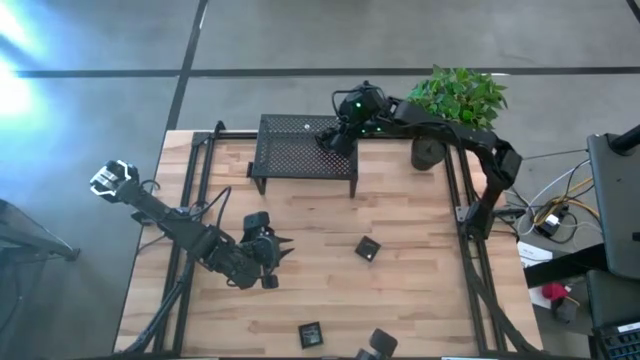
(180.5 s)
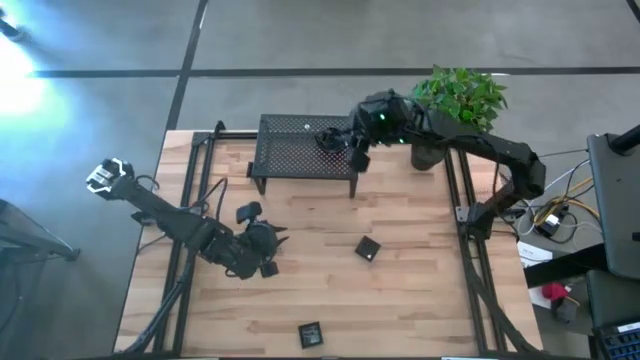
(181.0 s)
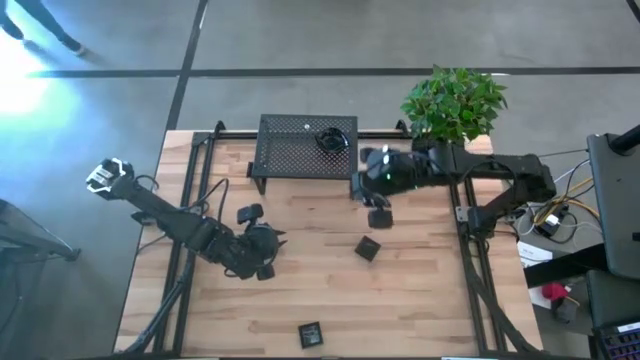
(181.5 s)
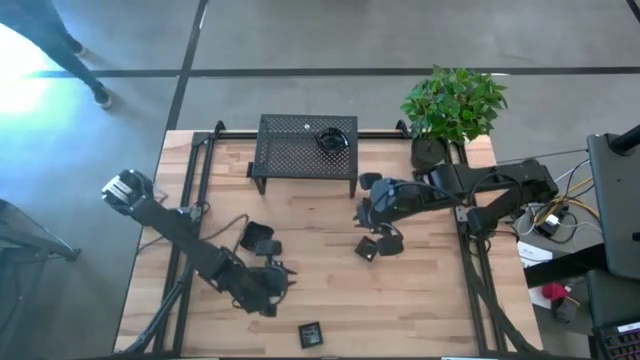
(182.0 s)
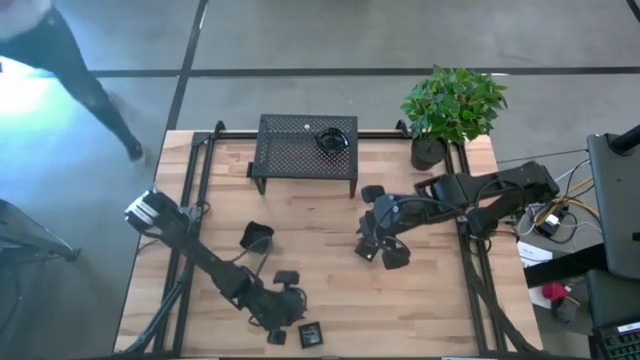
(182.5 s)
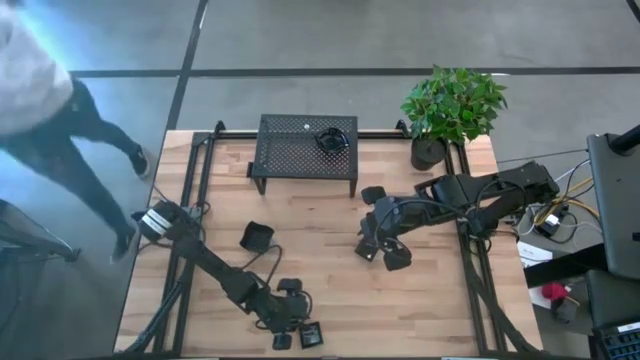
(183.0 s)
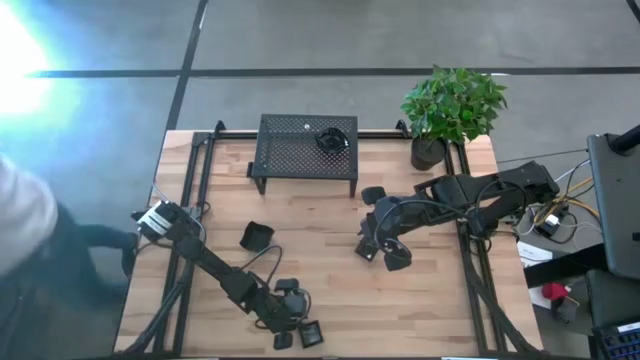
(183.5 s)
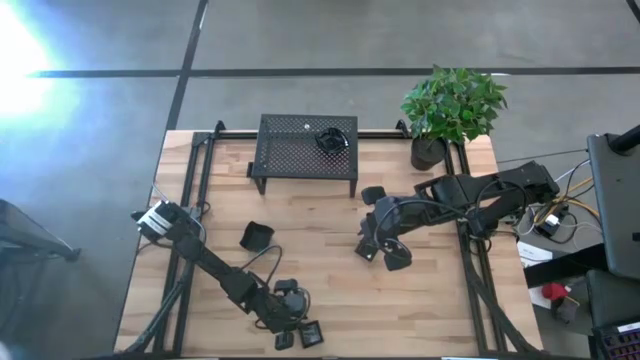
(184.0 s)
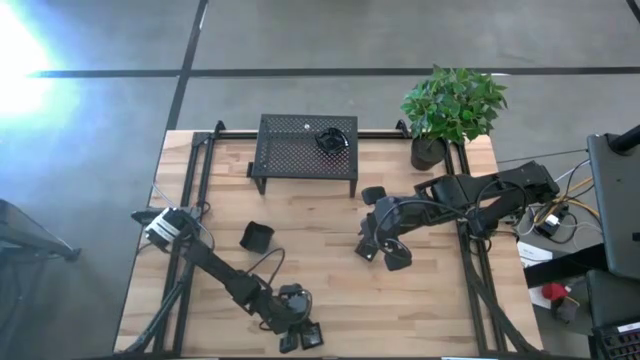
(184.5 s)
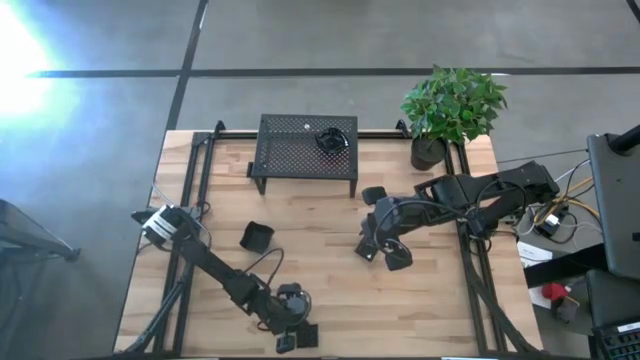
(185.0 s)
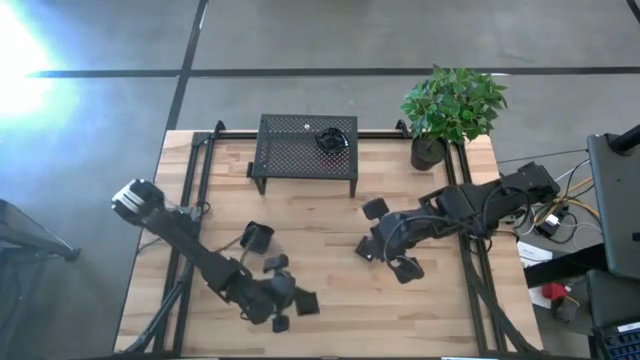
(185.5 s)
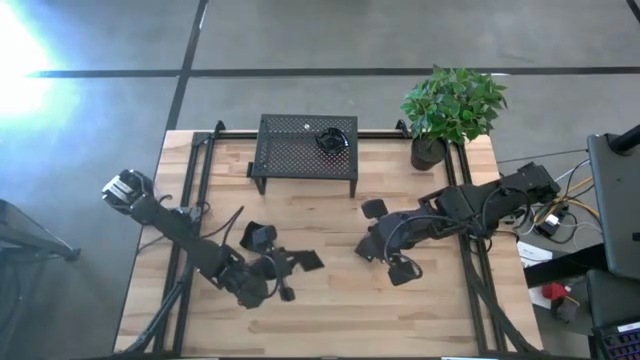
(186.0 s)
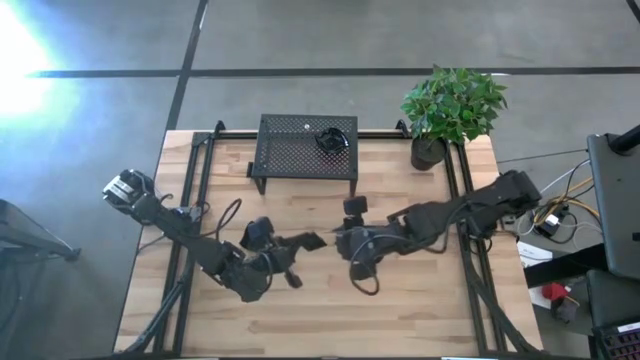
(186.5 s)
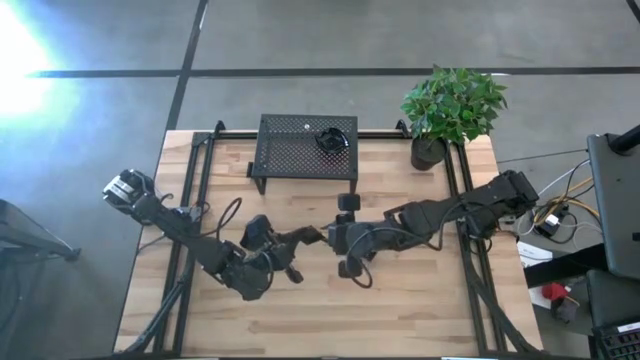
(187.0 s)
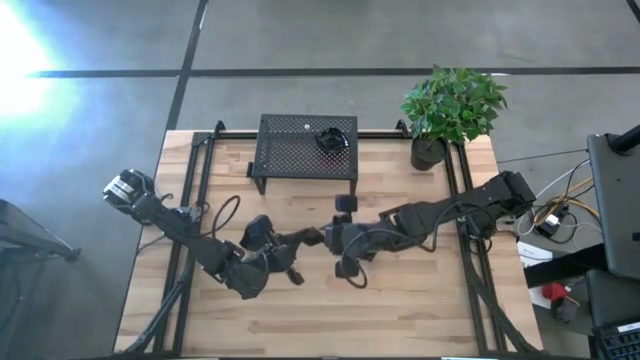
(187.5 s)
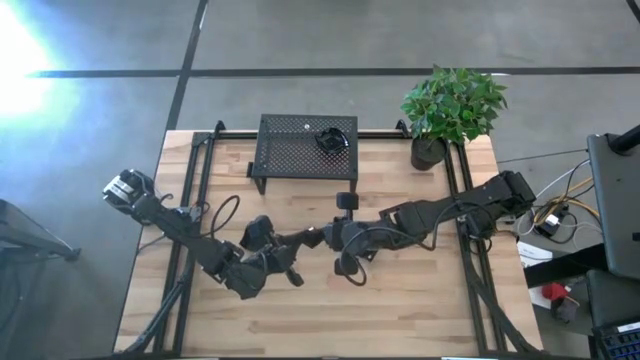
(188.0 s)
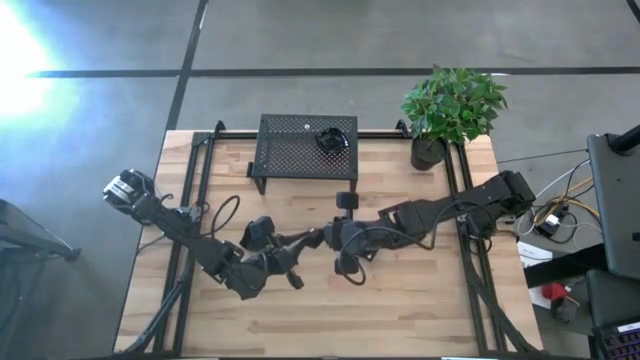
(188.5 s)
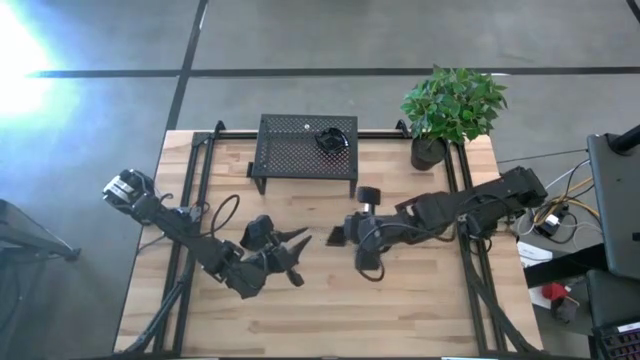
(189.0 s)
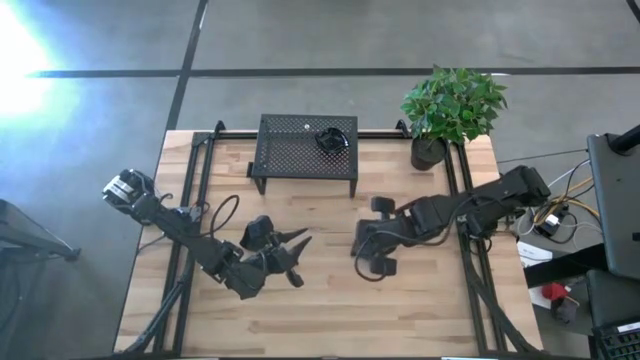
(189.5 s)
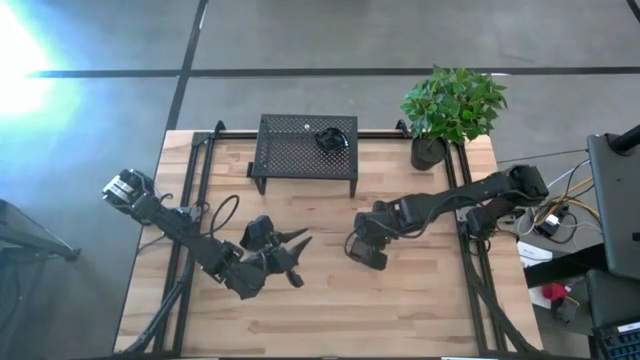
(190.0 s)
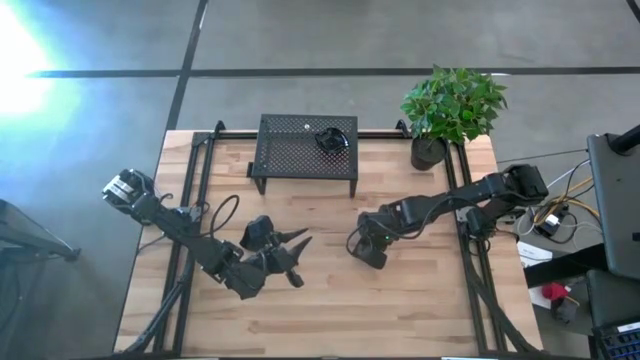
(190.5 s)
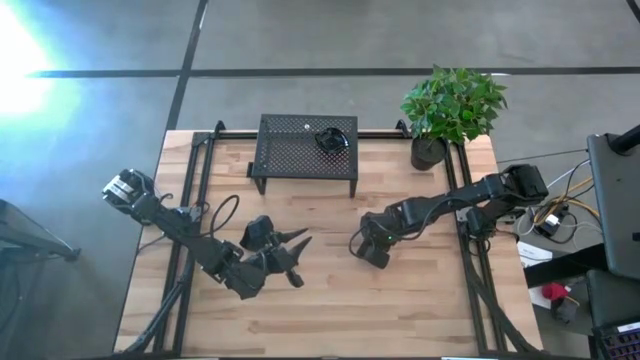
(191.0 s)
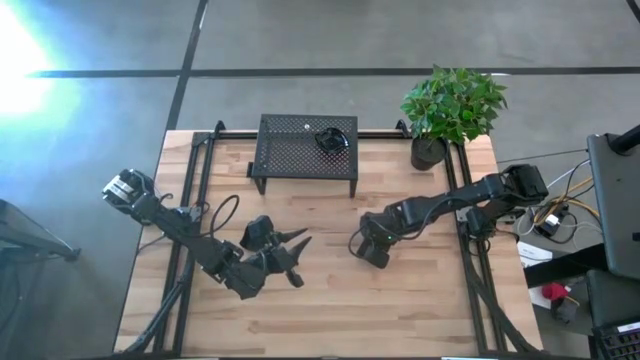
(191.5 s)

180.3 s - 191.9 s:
Task: Pick & Place Mini shaped plates
Stack the black square plate on top of the other black square plate

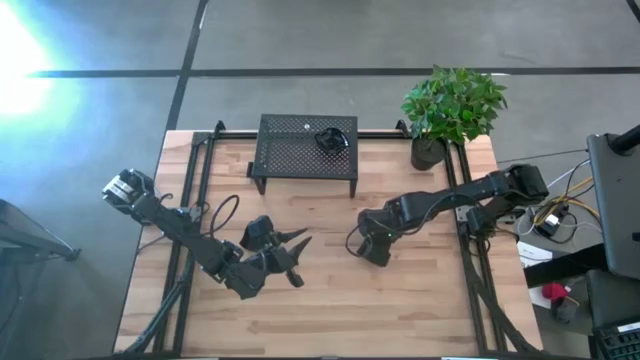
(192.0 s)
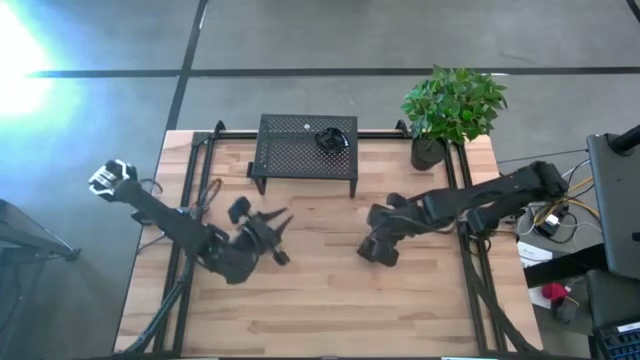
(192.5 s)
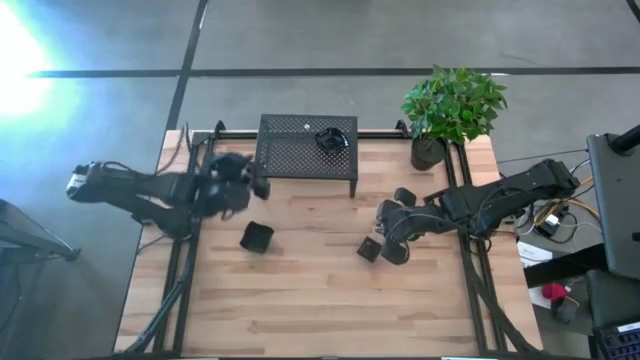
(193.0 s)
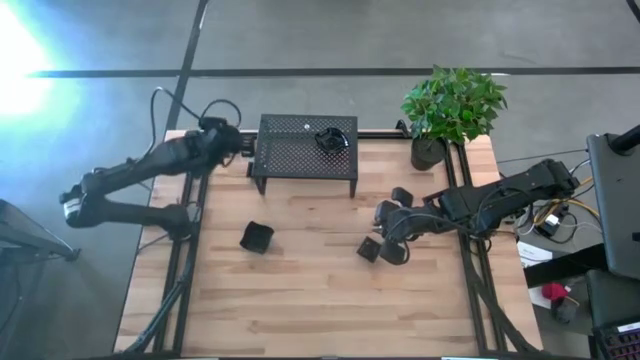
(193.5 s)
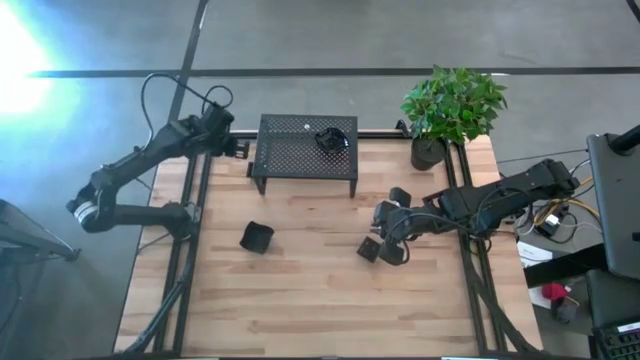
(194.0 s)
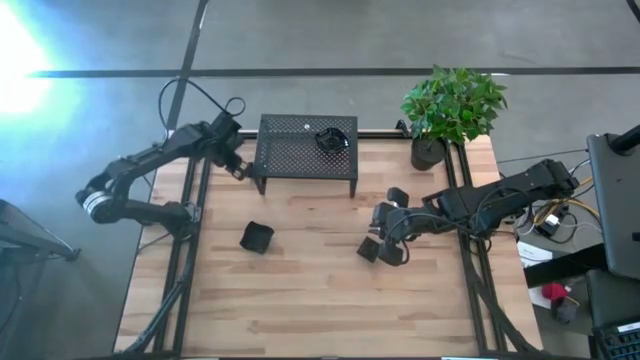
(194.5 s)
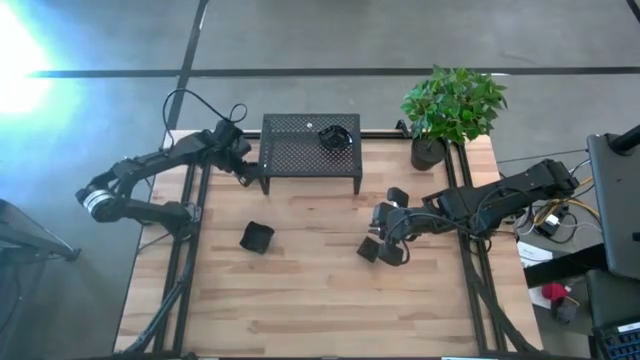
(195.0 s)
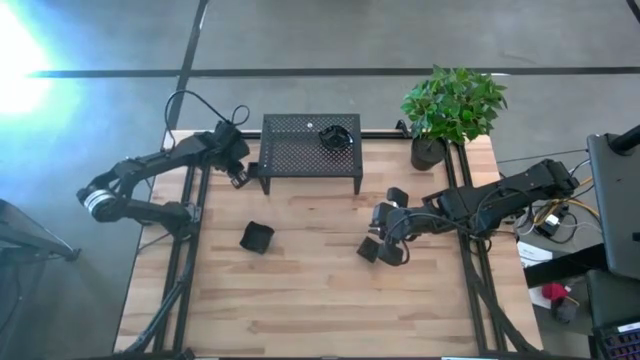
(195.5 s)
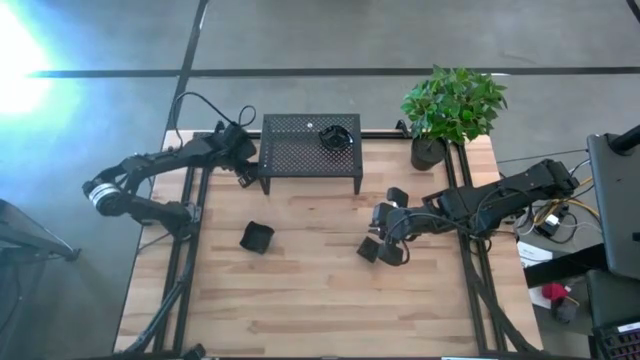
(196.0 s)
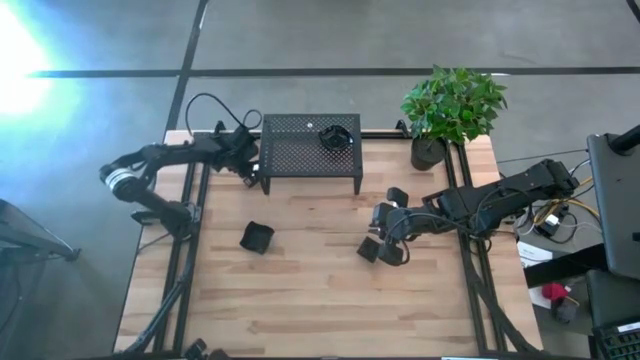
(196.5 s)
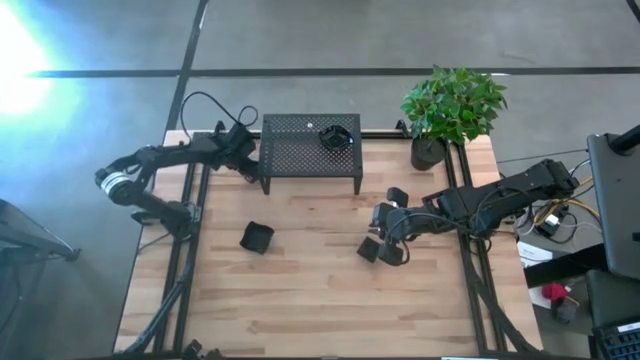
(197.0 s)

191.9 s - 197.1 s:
Stack the black square plate on top of the other black square plate

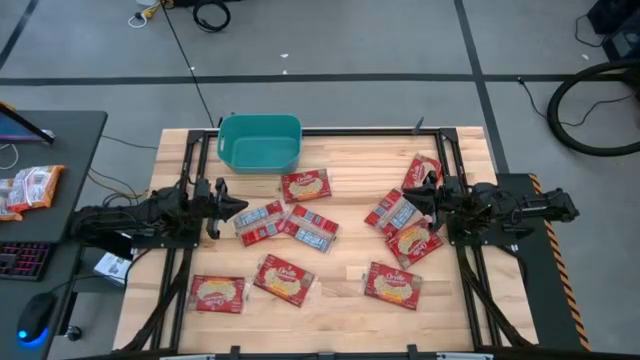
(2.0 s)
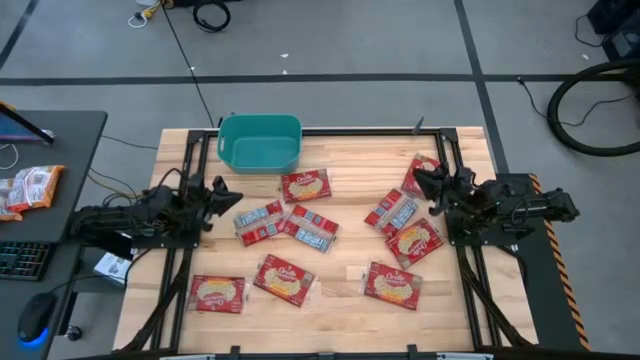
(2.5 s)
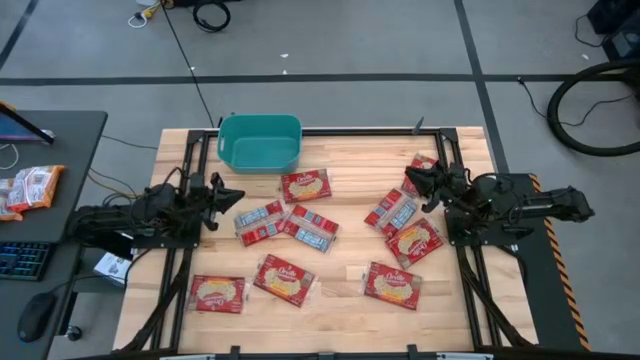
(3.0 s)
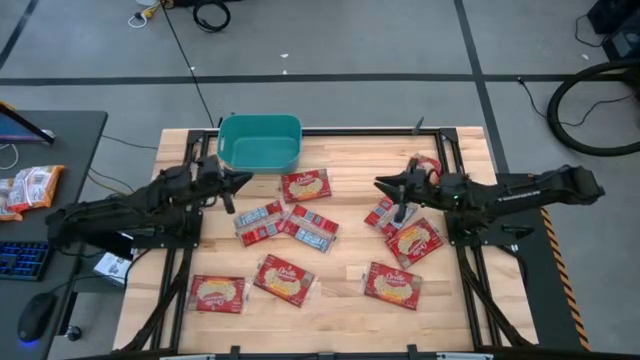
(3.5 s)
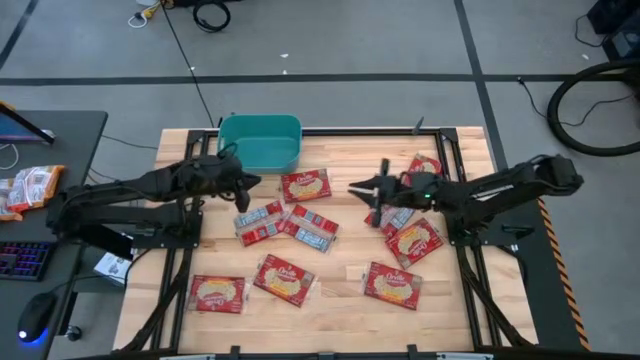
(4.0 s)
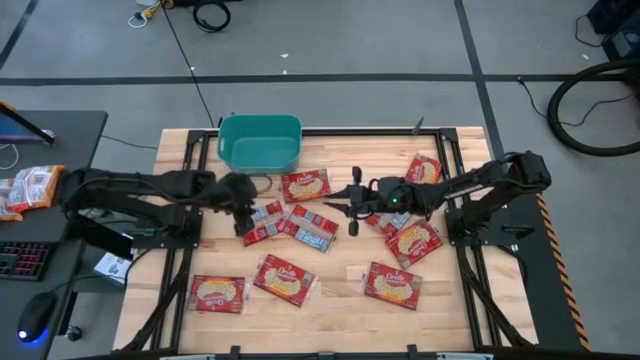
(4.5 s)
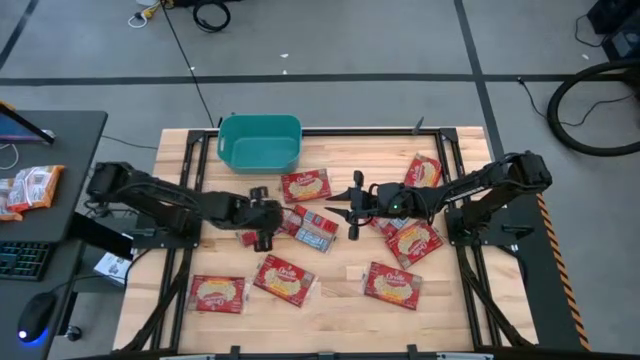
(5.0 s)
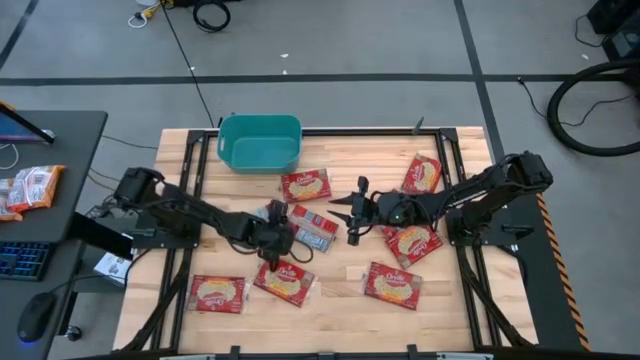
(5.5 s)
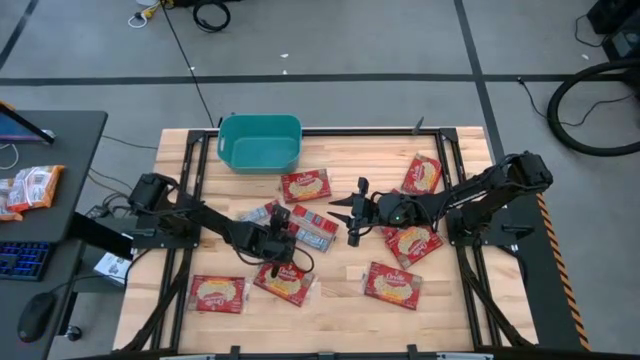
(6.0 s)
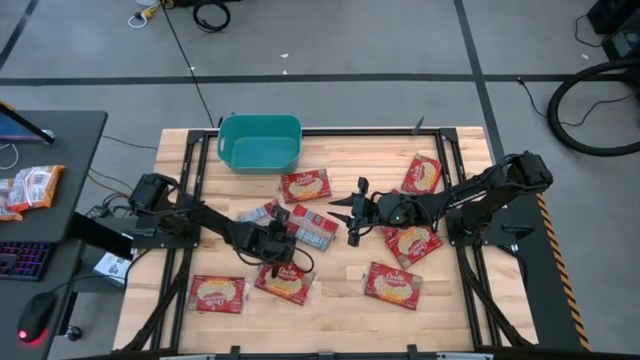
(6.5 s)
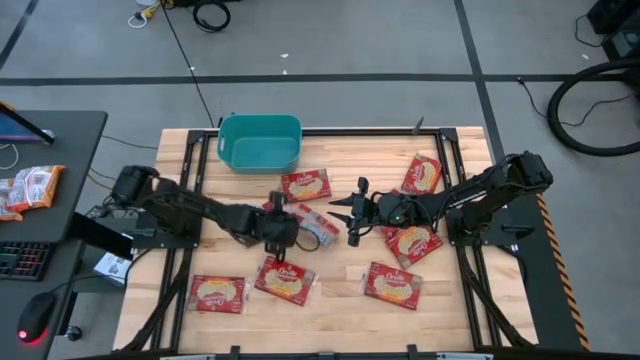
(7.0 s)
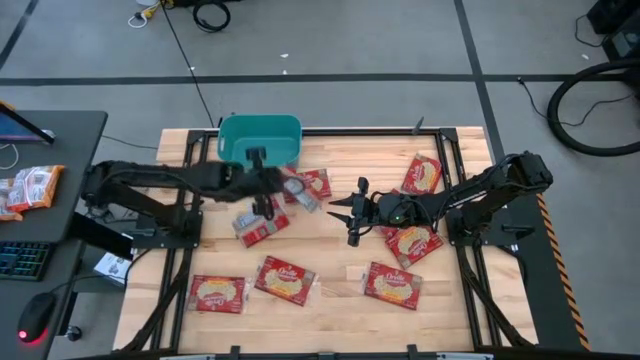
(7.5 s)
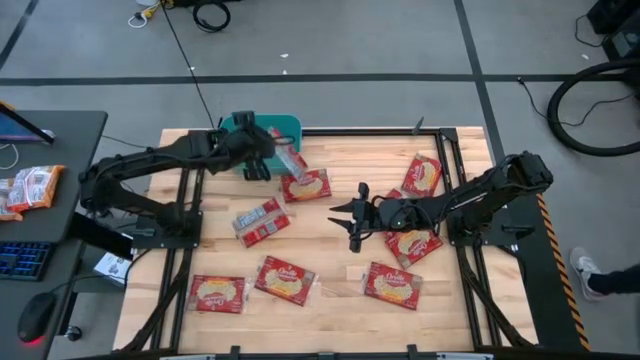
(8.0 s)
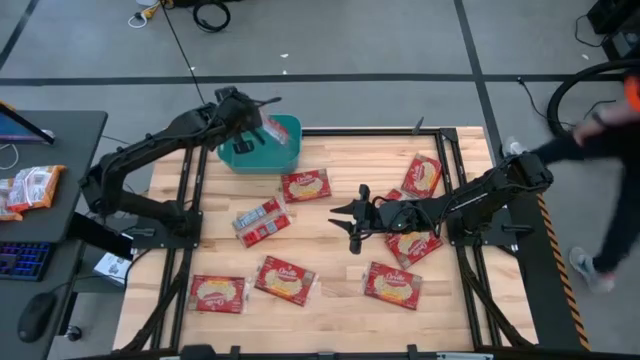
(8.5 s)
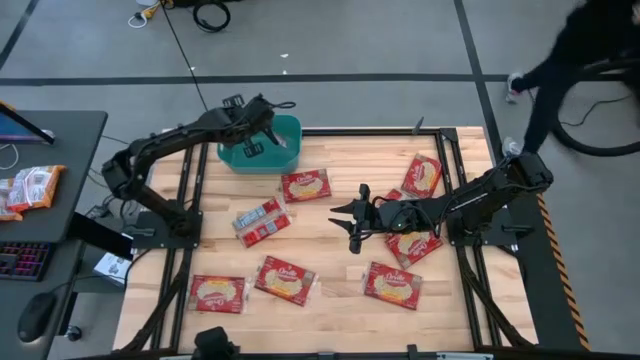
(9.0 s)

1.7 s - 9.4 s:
Task: Sort popcorn bags into baskets
Put the popcorn bag into the bin
